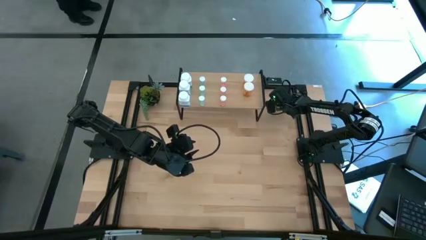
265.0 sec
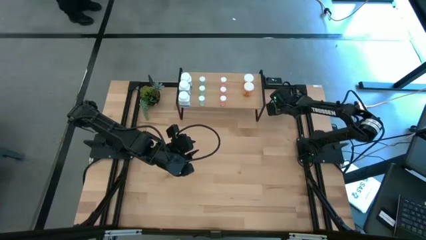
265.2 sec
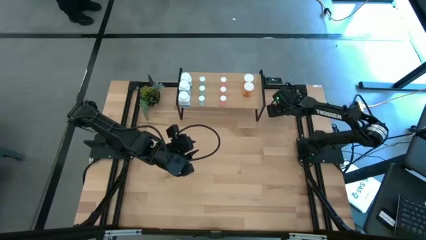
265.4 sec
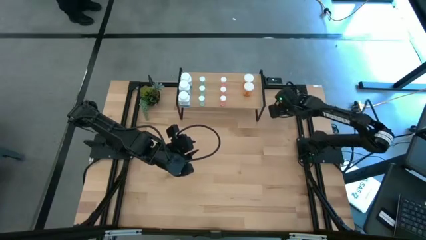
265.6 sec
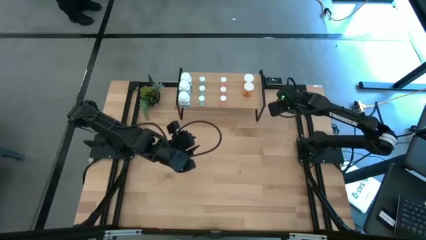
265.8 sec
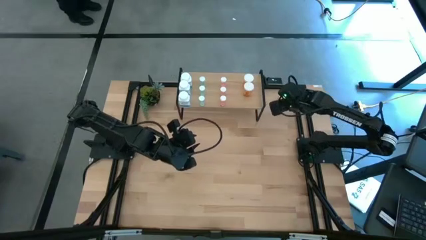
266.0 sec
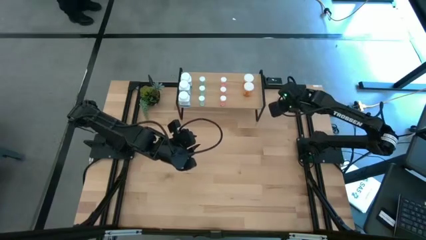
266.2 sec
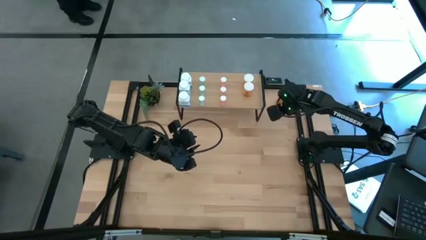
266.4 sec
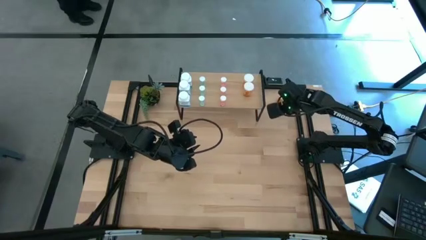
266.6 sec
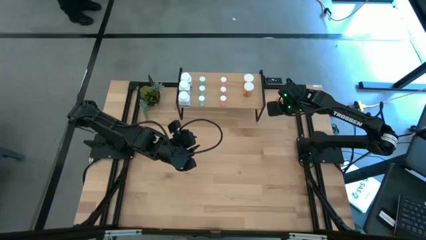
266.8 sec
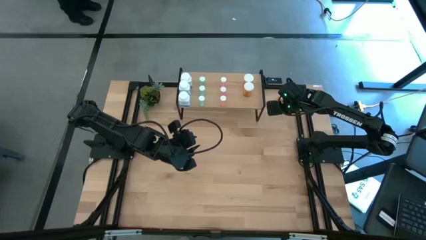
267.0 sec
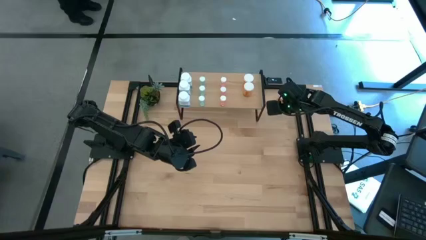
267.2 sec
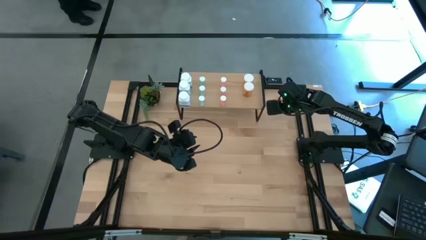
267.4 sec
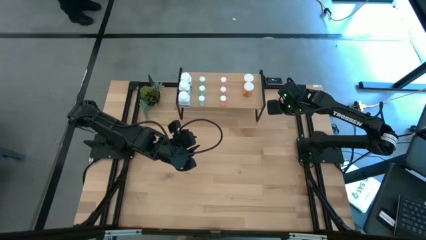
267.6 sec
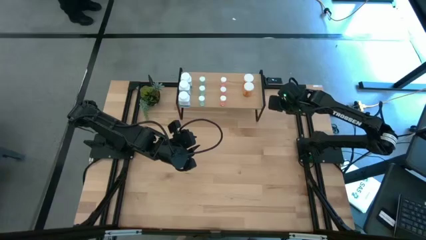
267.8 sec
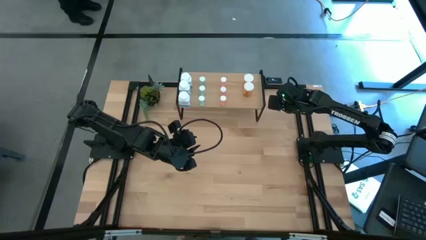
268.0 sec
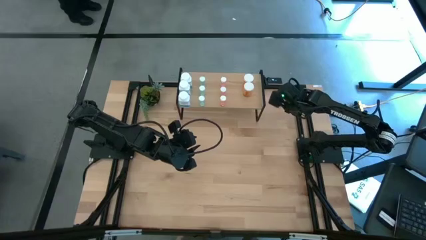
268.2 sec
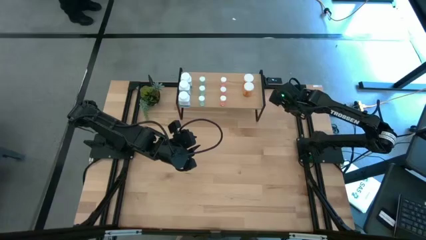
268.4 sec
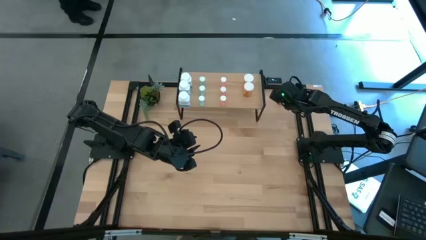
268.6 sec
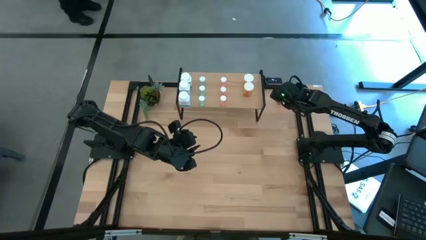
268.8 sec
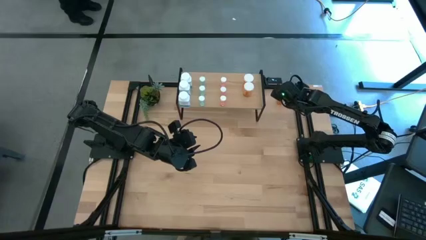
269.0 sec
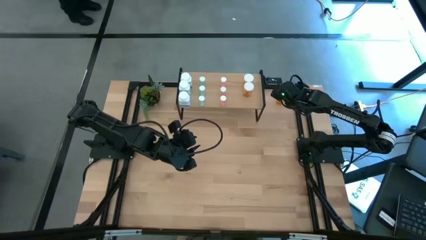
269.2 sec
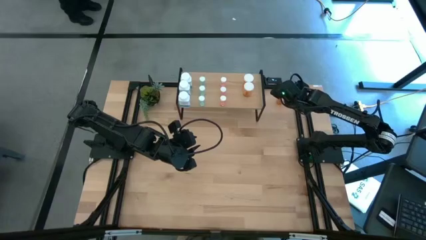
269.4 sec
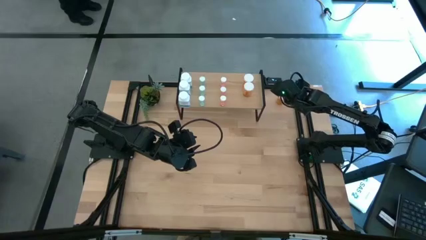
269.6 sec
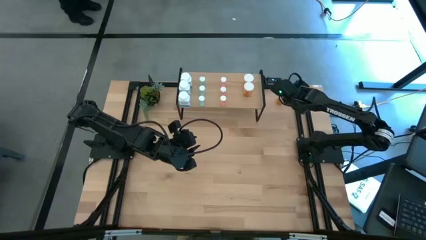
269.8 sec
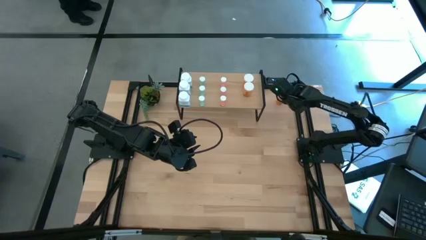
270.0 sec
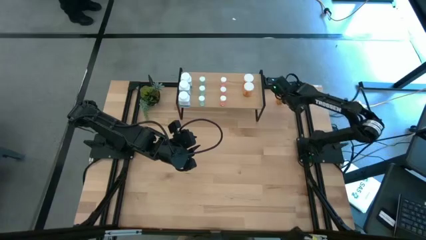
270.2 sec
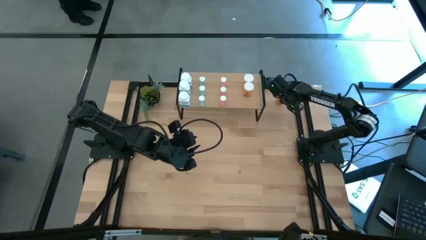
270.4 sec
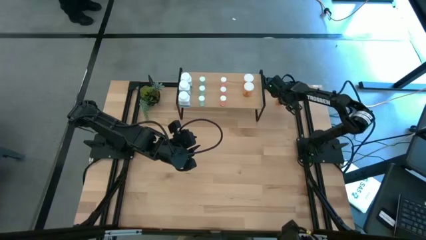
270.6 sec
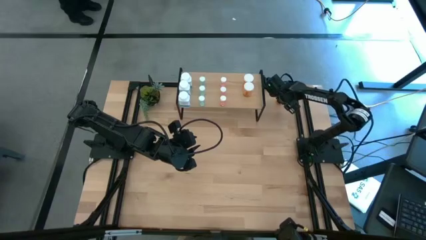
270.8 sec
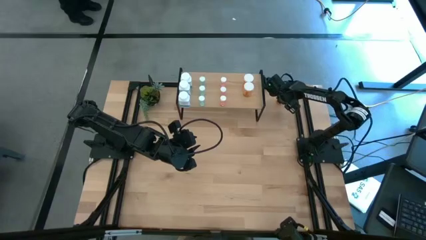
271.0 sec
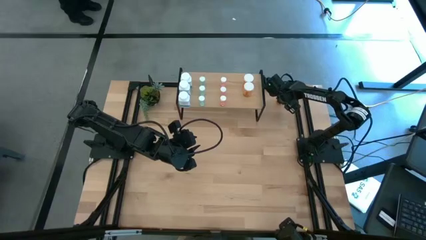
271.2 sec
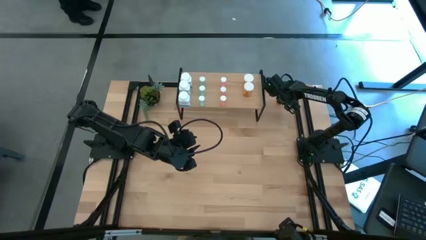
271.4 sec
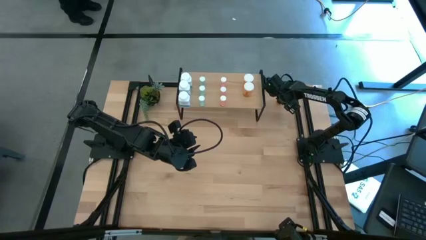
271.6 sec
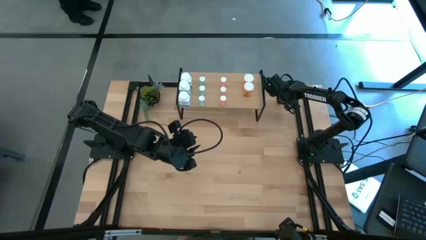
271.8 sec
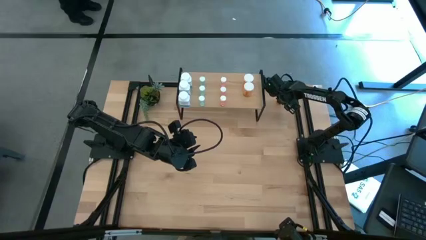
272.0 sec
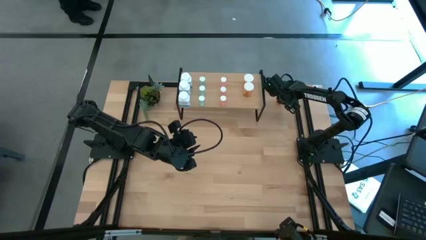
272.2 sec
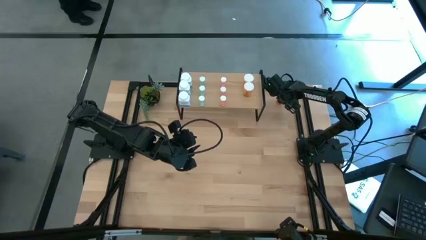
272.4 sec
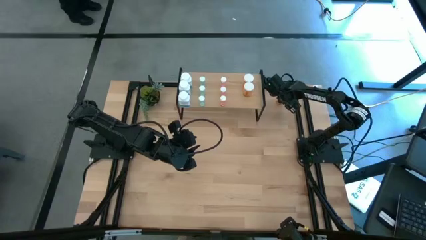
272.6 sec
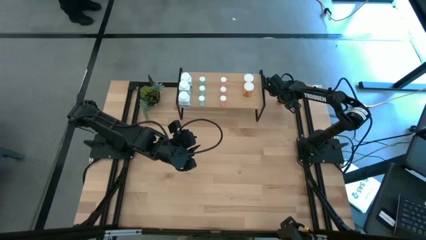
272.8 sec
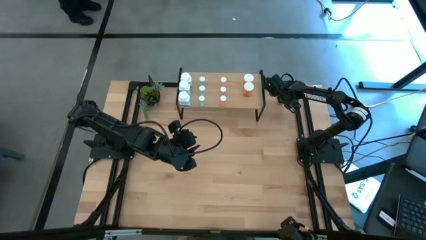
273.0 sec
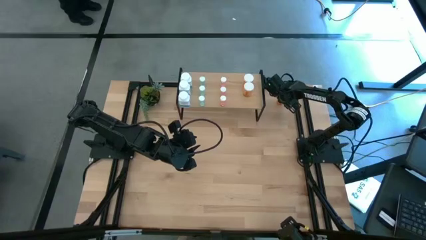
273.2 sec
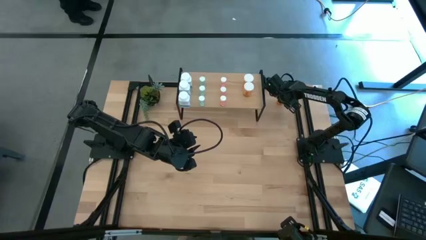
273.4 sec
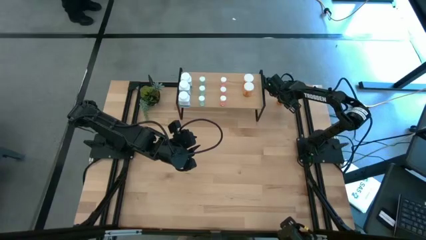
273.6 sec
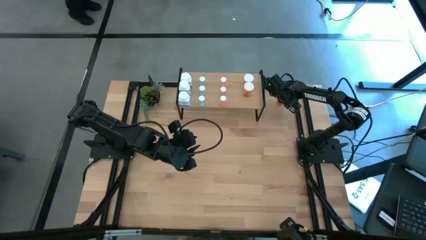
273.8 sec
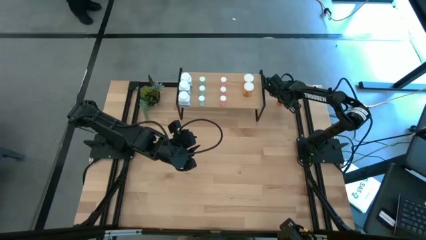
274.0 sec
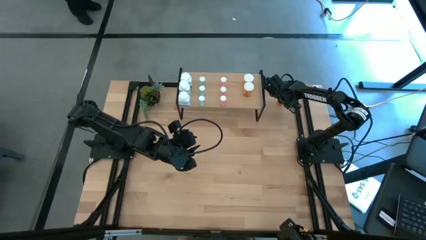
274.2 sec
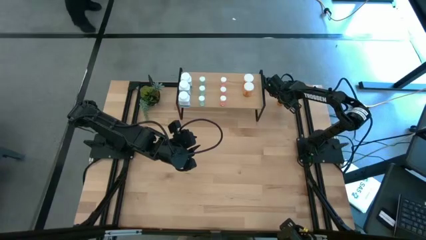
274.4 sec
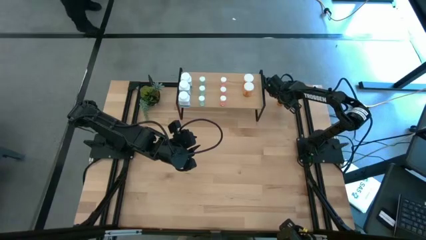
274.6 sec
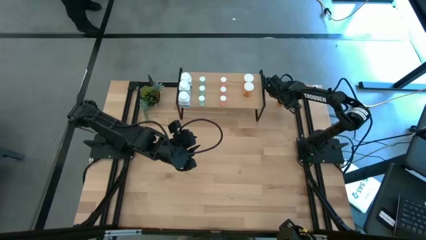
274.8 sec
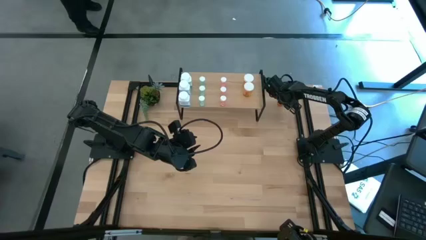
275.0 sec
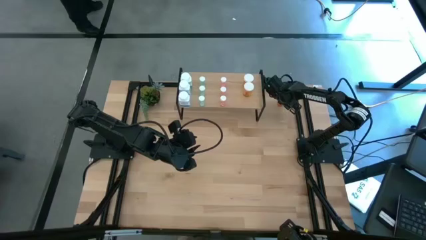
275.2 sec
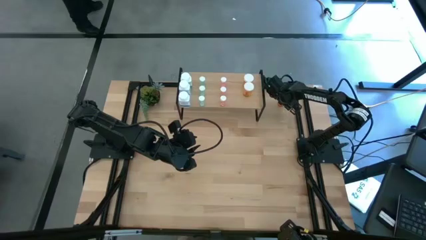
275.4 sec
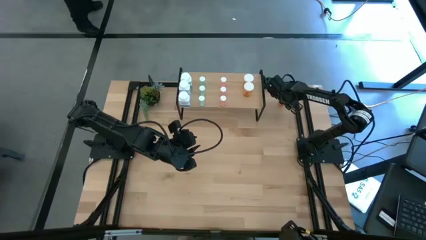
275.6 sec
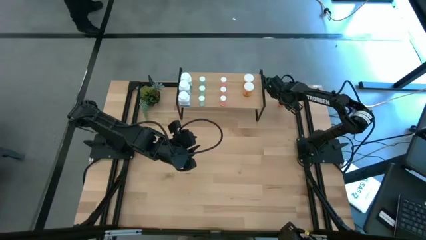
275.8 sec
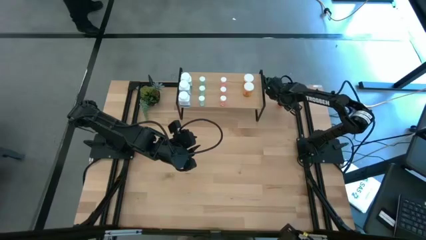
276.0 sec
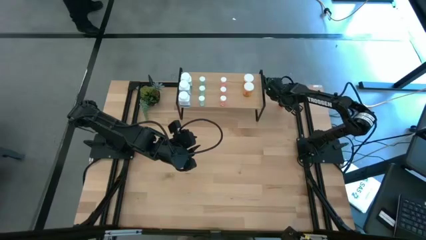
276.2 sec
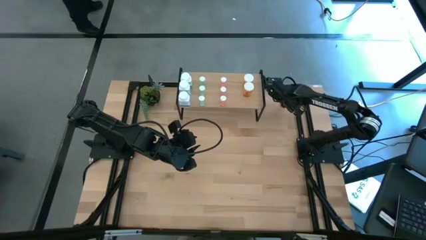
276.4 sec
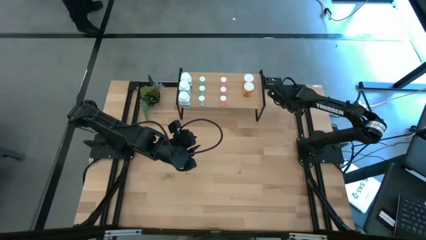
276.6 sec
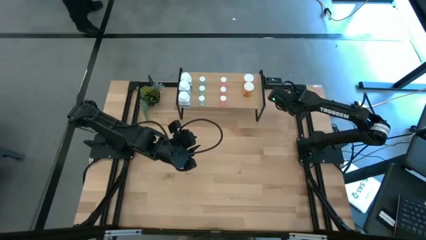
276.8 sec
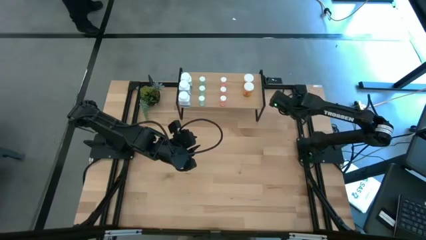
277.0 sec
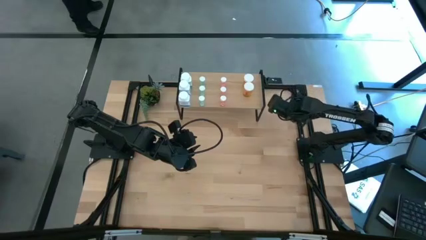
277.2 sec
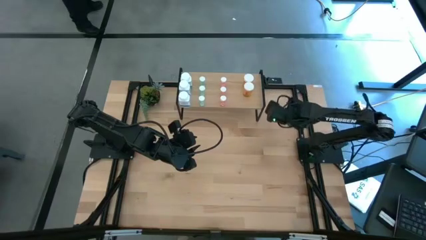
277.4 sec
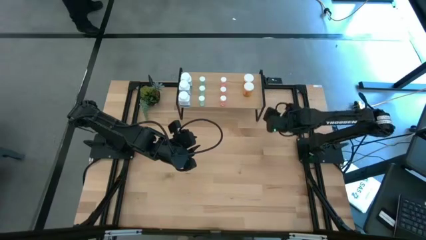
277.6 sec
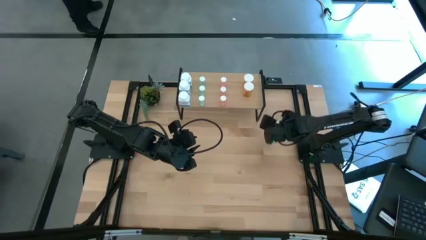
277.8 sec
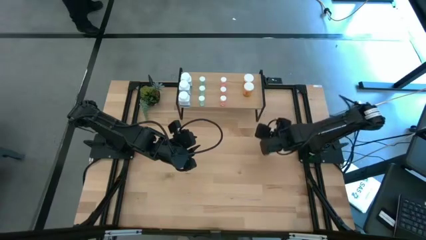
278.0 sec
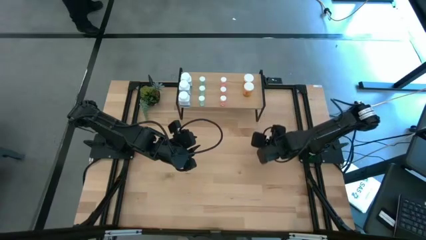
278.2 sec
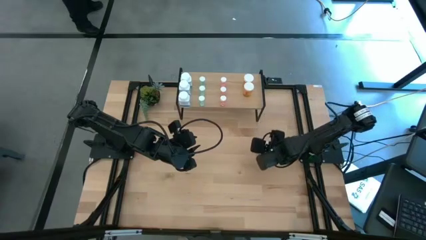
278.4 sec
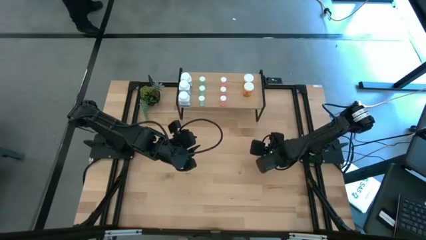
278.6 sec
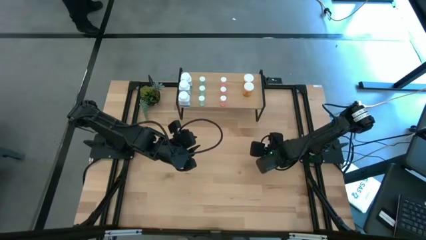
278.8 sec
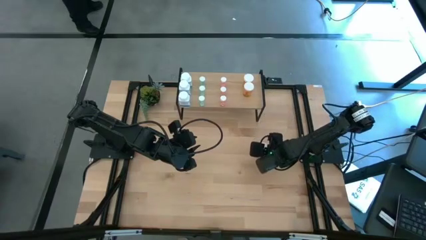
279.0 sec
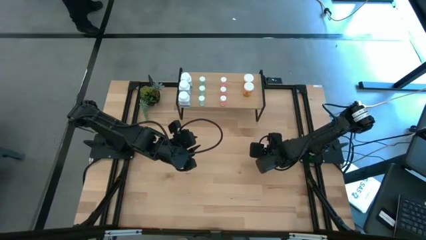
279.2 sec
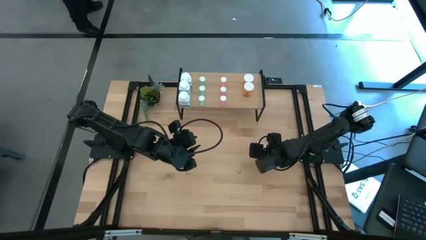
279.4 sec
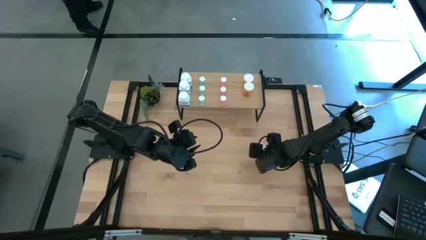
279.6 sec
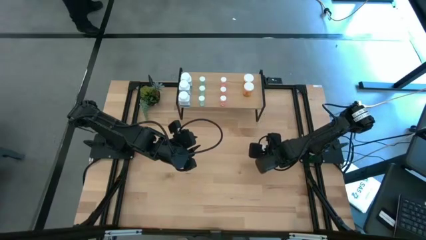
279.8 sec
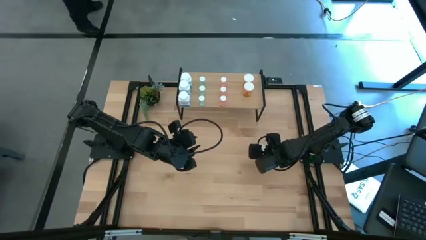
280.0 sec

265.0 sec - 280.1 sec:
Task: Pick and place medicine bottles onto shelf by color
Put the orange pill bottle on the shelf aligned with the other orange pill bottles
